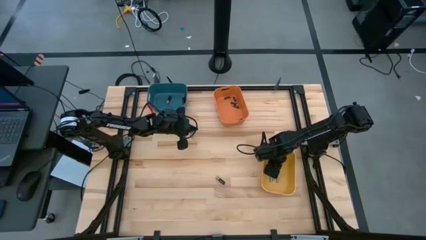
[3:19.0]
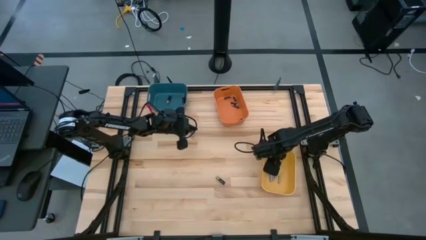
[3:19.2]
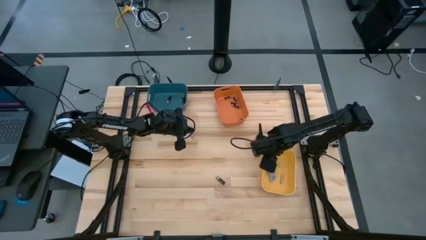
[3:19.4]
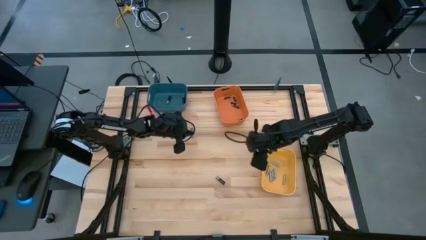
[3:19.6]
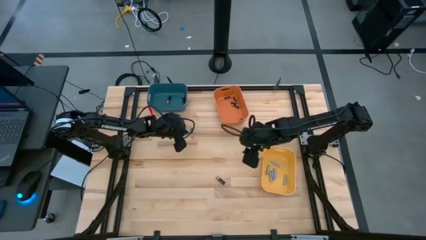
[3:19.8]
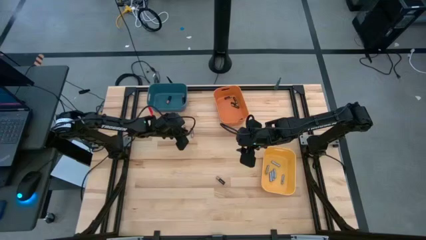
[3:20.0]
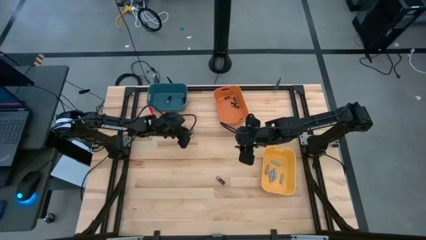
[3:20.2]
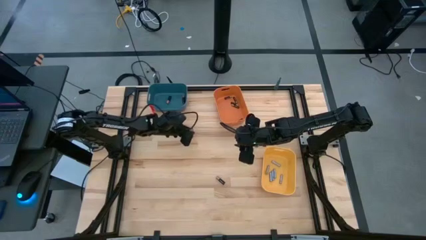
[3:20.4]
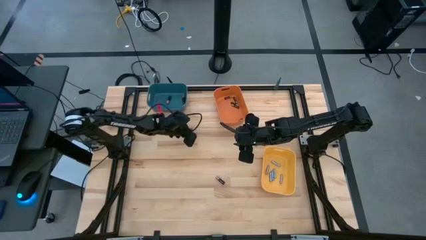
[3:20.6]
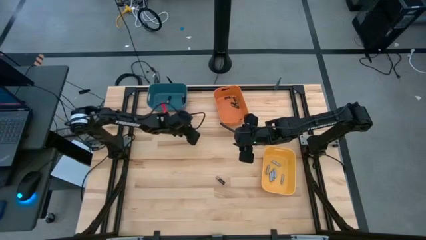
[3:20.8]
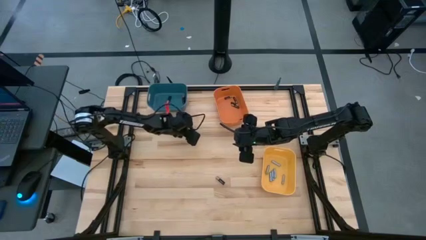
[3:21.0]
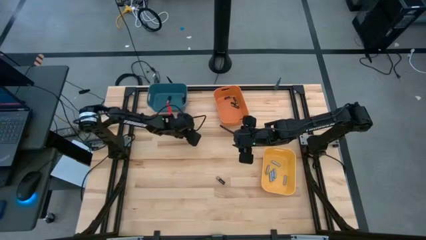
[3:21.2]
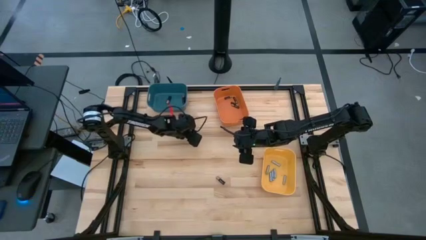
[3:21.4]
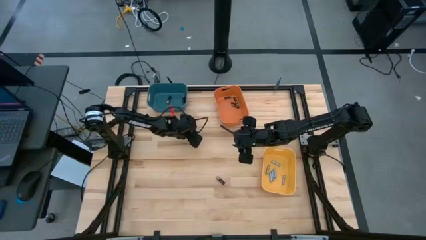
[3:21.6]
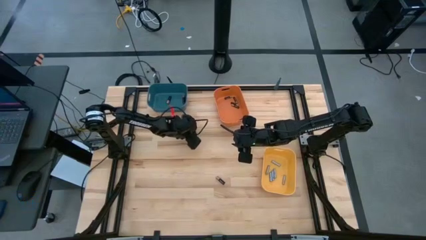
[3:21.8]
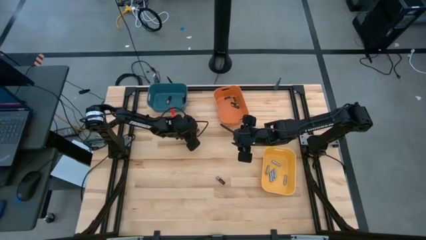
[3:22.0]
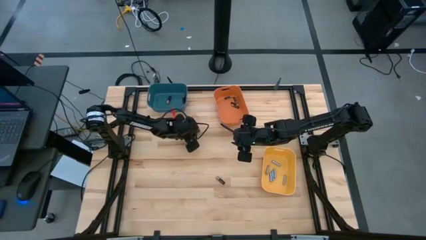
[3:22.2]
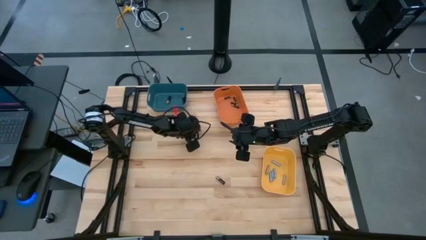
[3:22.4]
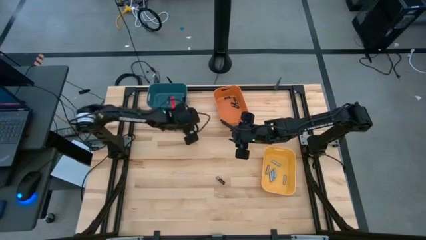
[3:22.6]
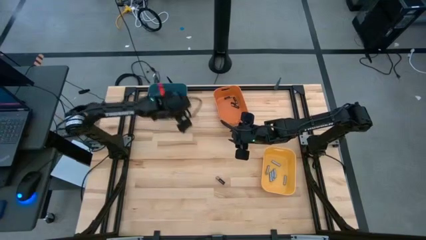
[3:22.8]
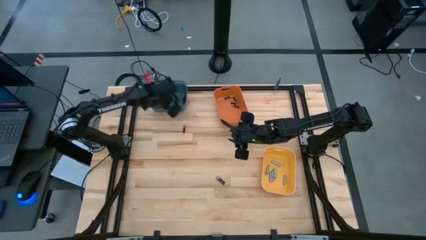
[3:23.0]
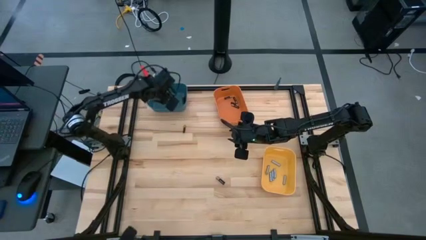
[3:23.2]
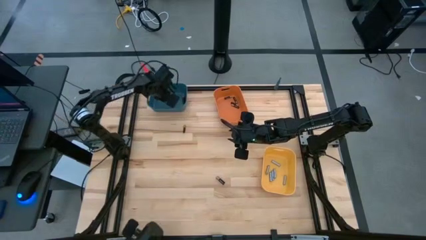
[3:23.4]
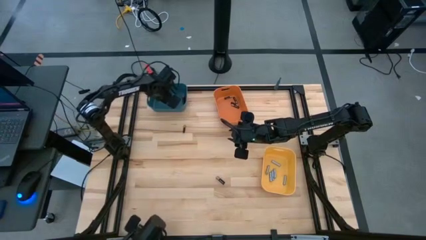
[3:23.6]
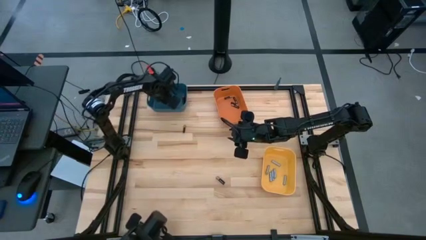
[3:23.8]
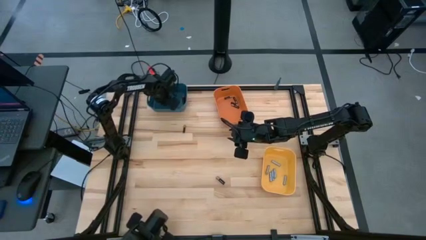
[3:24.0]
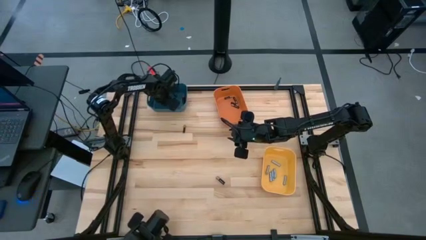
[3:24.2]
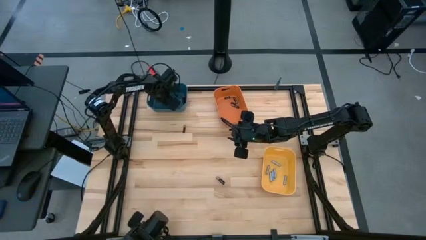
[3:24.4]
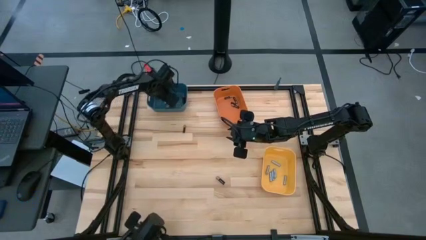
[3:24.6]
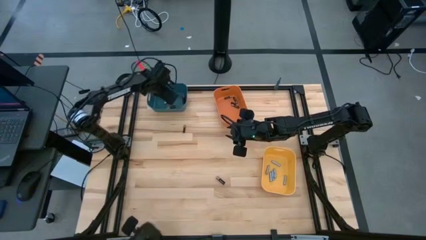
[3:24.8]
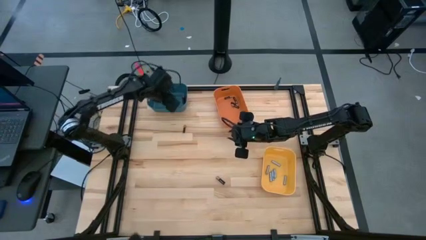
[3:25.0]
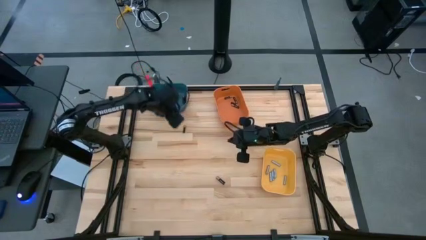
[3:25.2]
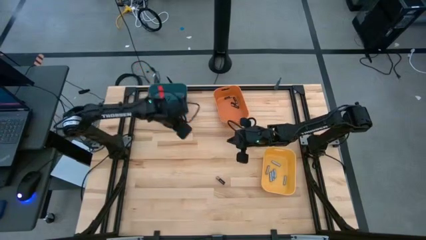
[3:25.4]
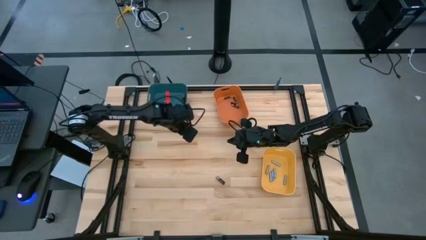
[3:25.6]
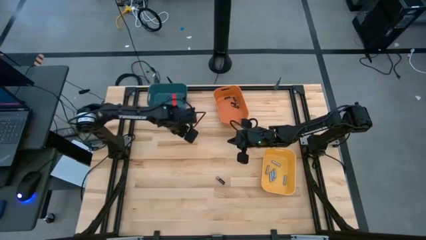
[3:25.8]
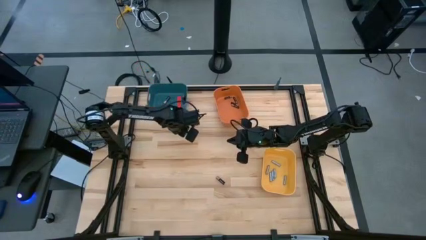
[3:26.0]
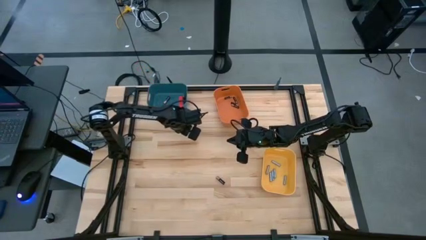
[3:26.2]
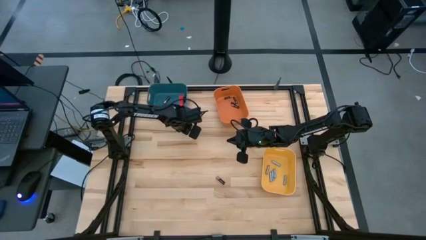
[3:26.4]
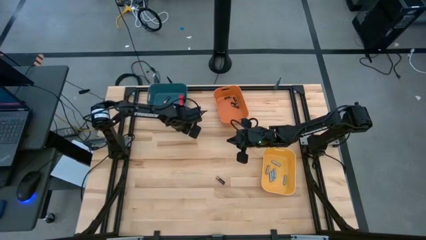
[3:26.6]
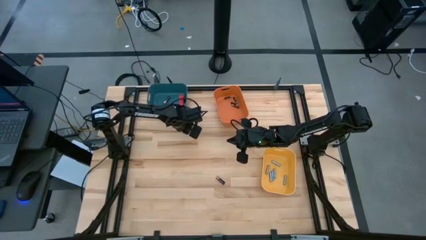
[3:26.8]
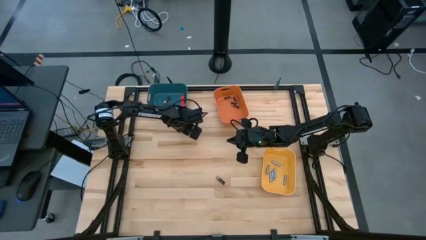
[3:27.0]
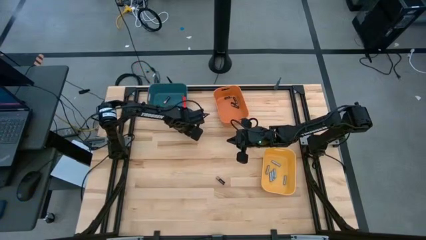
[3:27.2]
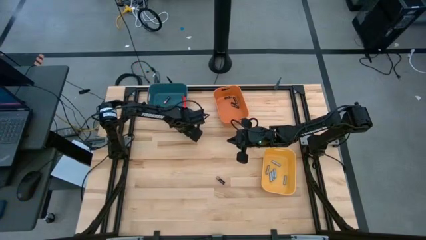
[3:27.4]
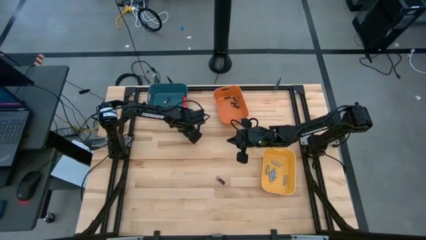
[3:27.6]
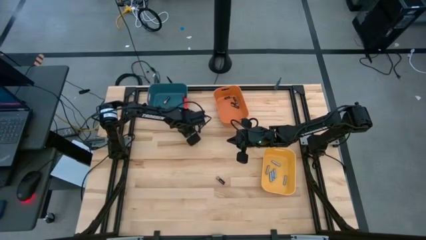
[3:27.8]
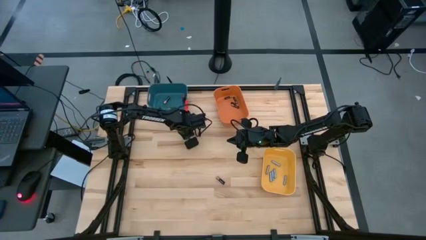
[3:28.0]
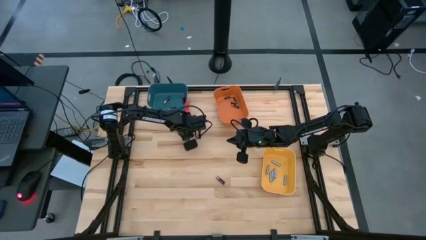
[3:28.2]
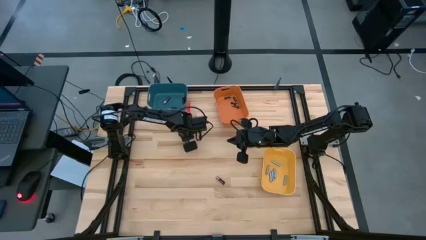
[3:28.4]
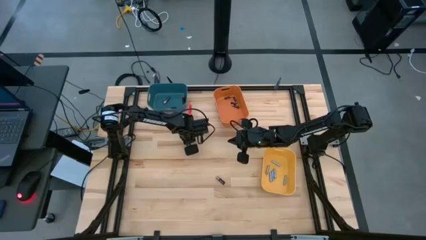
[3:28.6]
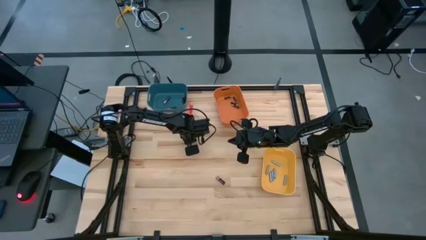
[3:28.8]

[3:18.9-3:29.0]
Task: Sort batteries
Put the big black battery into the blue bin

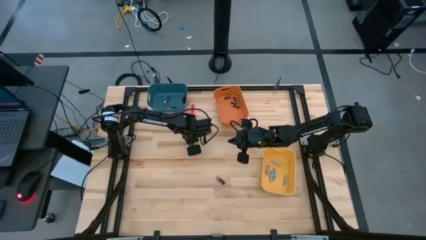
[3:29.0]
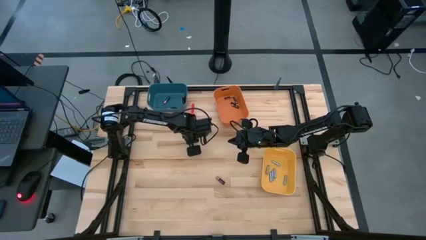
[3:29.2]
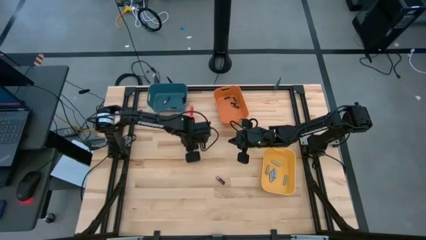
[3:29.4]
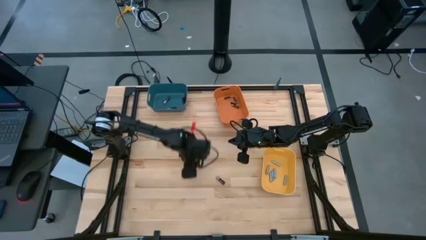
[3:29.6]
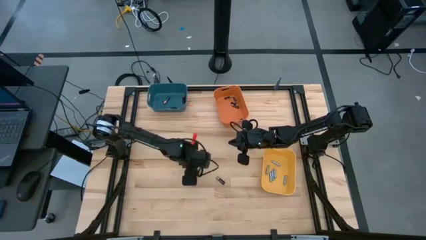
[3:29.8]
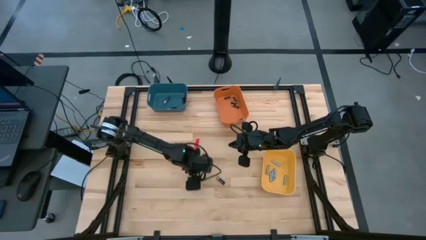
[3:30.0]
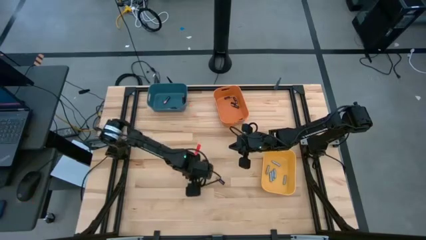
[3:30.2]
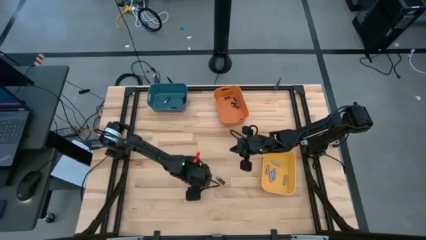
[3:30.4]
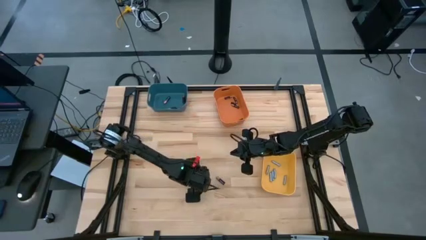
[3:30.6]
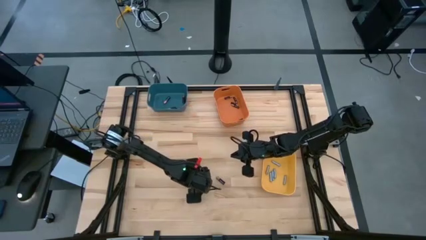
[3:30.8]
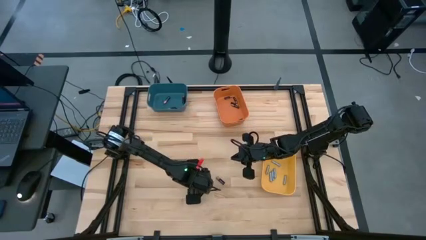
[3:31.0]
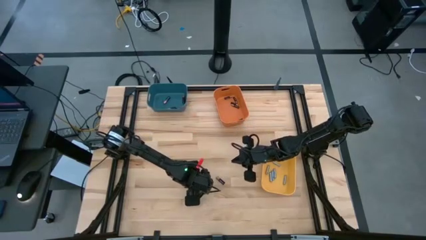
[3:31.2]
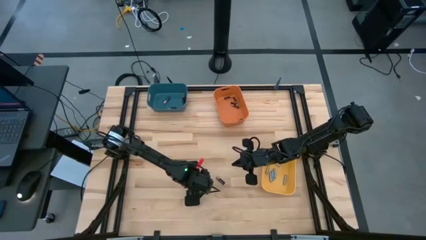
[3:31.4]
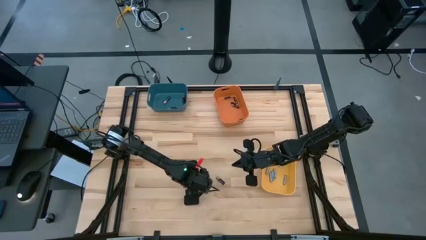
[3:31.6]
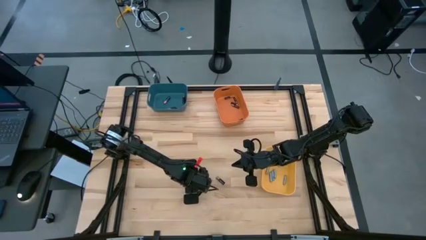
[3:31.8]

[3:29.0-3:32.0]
Put the big black battery into the blue bin

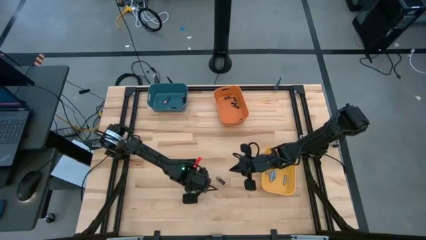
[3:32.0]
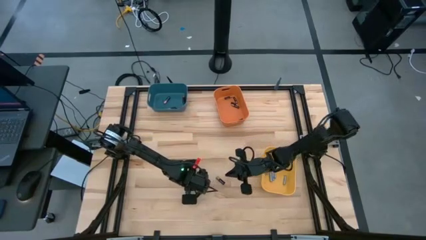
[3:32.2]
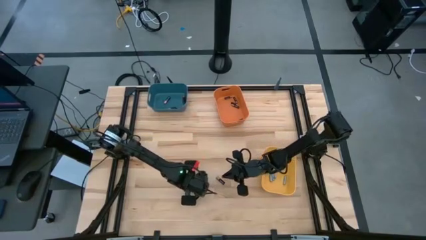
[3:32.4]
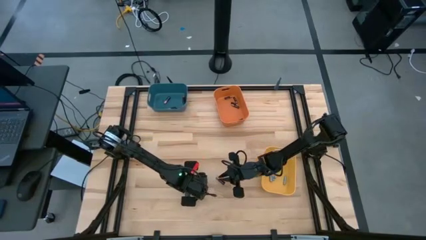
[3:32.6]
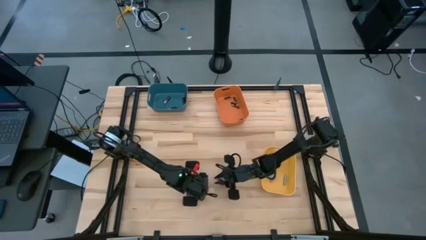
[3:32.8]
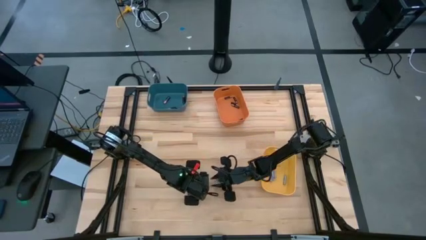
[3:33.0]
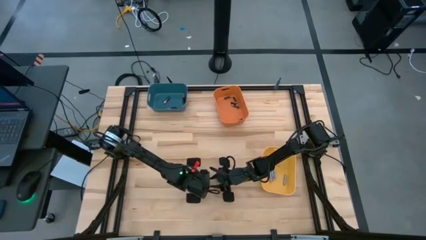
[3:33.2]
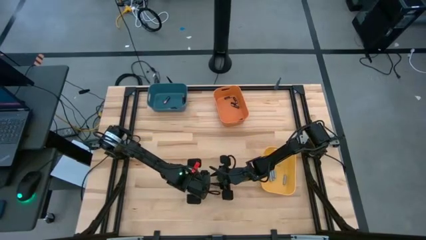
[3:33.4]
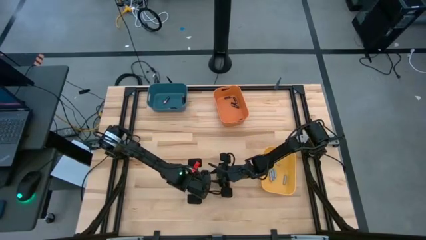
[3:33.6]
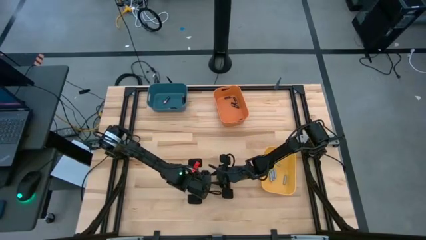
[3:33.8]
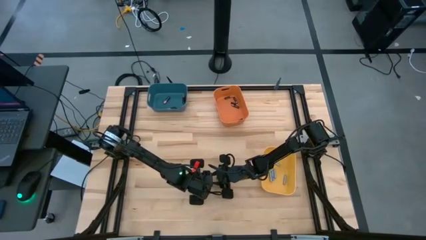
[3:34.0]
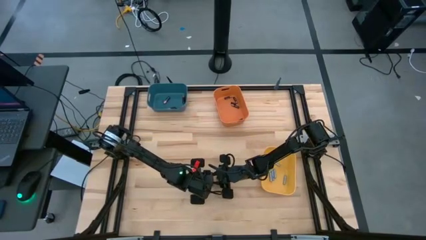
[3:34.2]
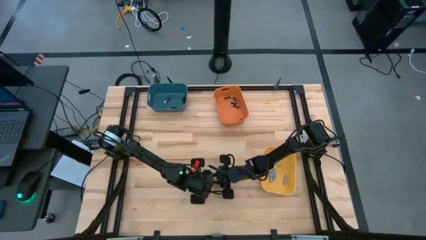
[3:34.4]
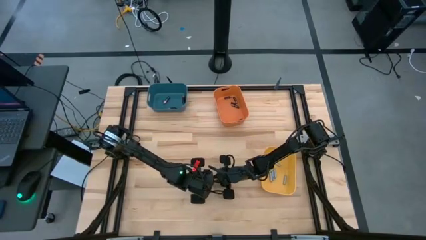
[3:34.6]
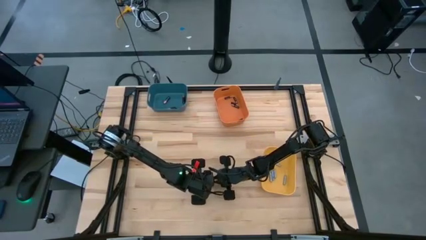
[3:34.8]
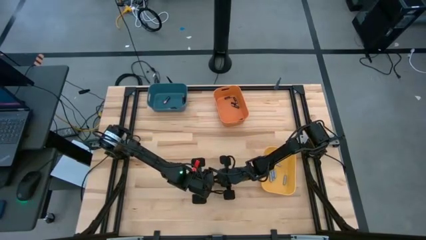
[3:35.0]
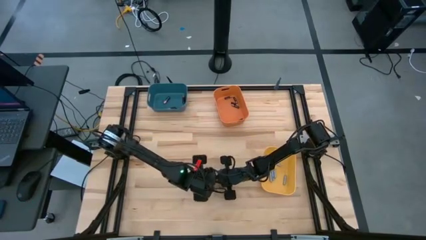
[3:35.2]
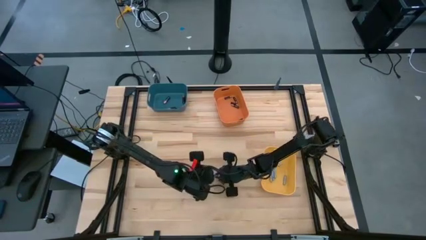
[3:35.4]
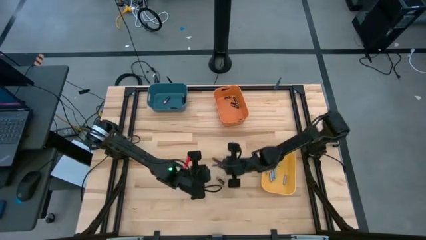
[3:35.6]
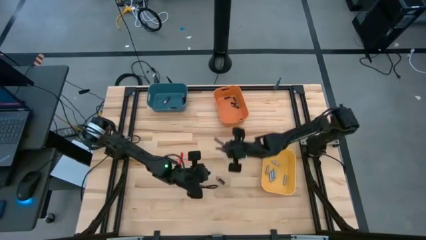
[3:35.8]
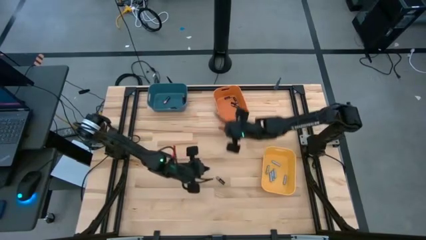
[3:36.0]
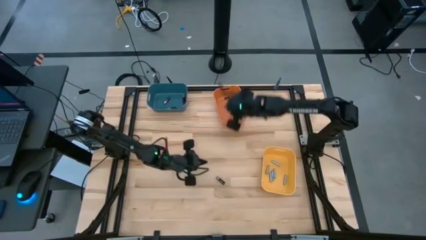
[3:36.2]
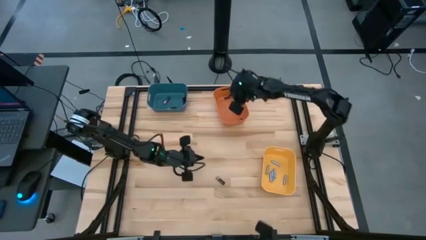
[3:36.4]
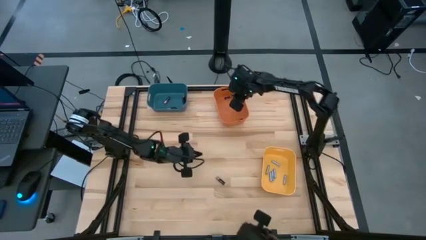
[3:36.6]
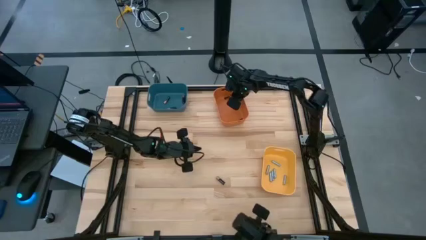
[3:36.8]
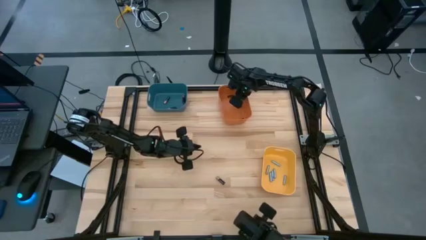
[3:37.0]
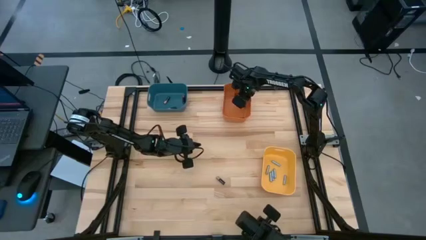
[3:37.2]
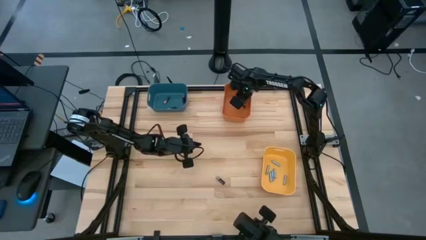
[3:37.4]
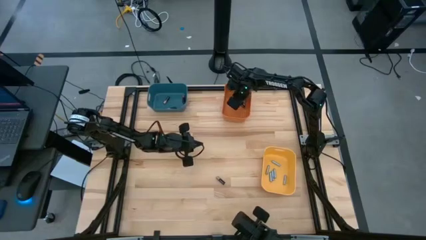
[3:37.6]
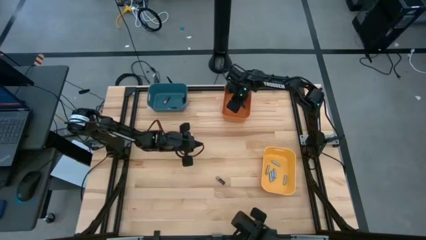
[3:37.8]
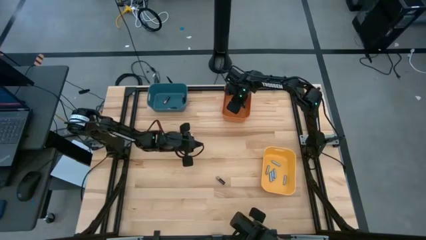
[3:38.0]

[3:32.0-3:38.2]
Put the small black battery into the orange bin
